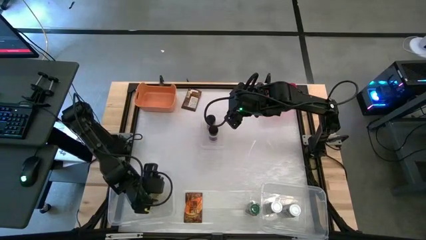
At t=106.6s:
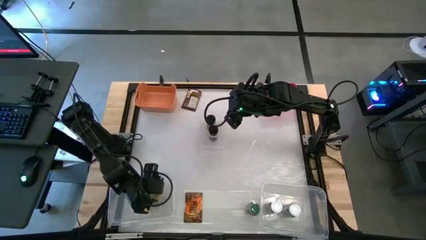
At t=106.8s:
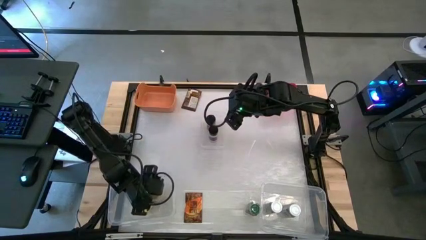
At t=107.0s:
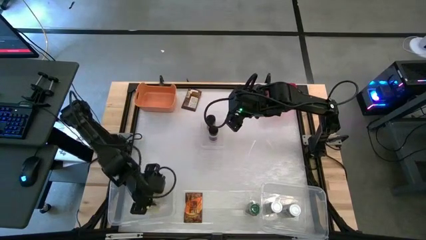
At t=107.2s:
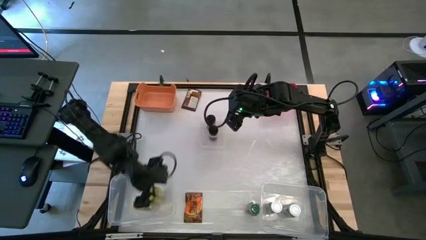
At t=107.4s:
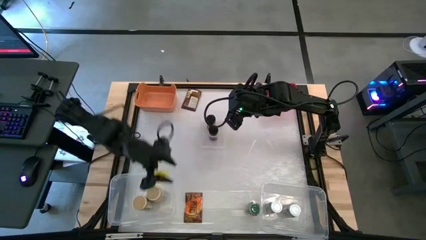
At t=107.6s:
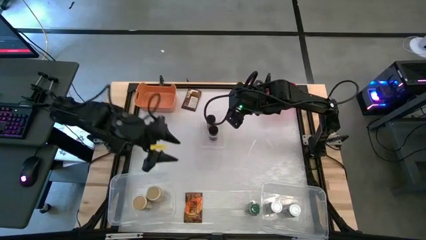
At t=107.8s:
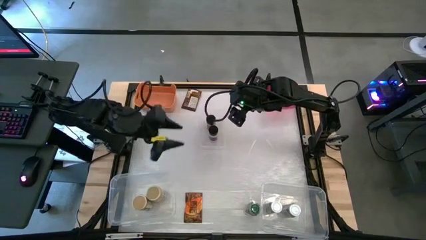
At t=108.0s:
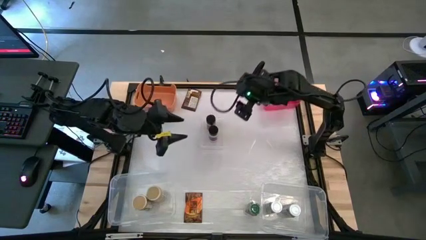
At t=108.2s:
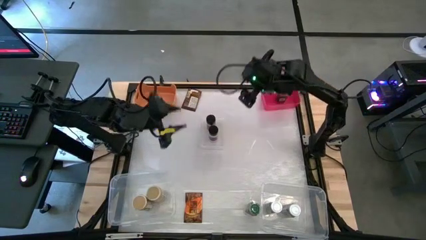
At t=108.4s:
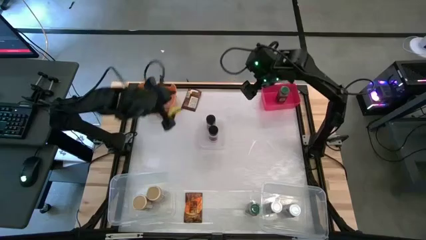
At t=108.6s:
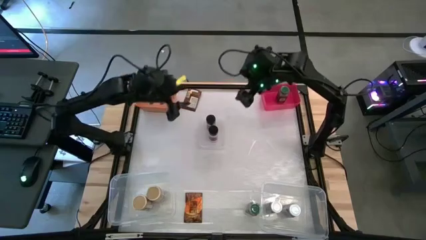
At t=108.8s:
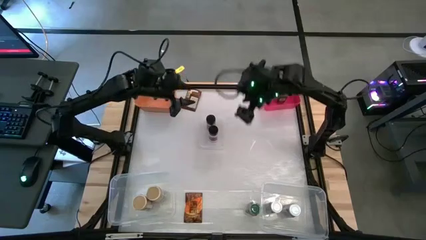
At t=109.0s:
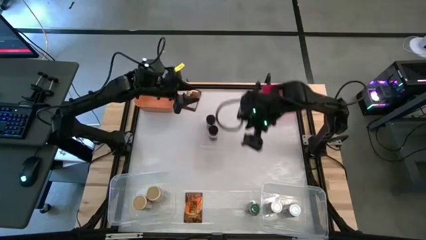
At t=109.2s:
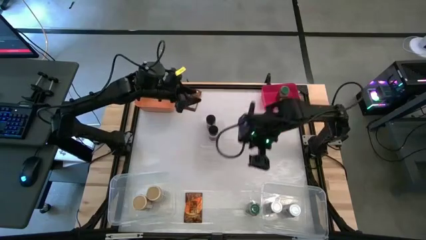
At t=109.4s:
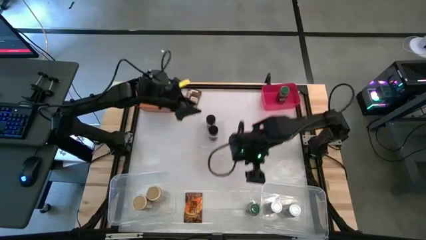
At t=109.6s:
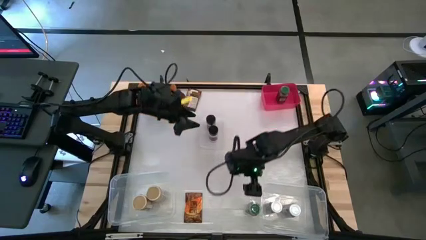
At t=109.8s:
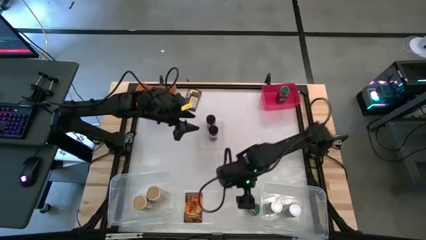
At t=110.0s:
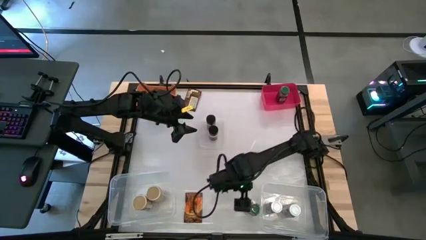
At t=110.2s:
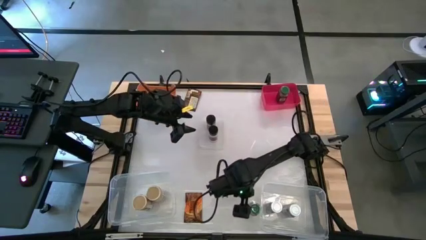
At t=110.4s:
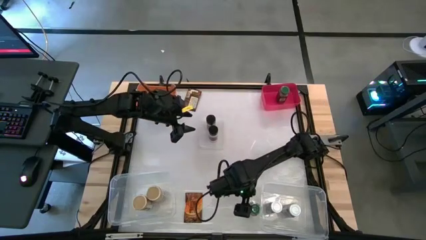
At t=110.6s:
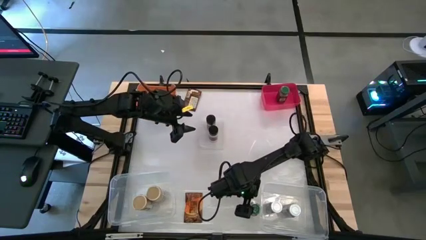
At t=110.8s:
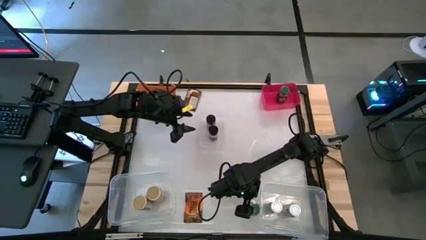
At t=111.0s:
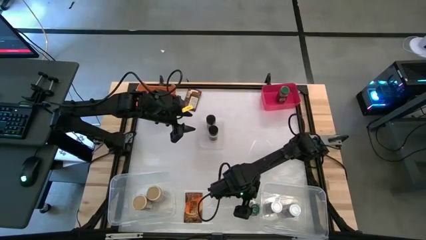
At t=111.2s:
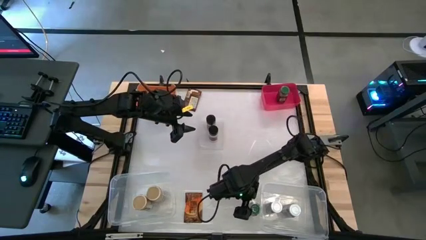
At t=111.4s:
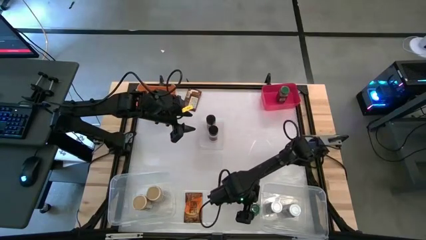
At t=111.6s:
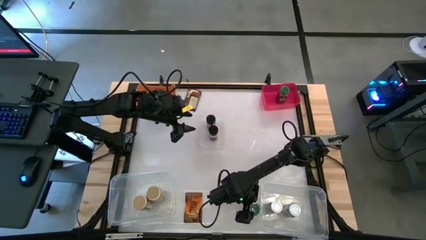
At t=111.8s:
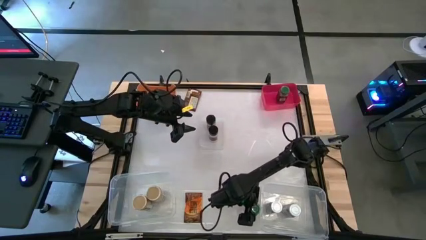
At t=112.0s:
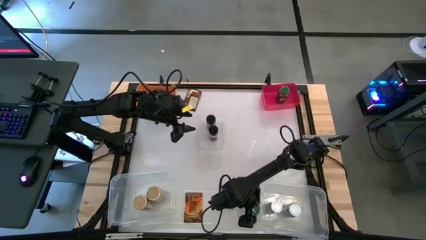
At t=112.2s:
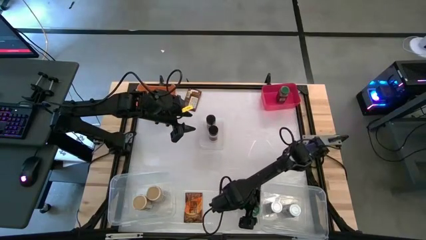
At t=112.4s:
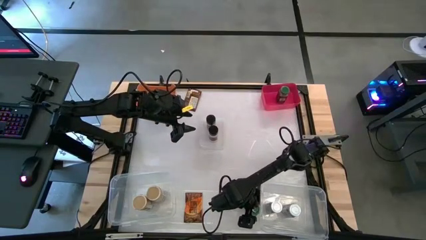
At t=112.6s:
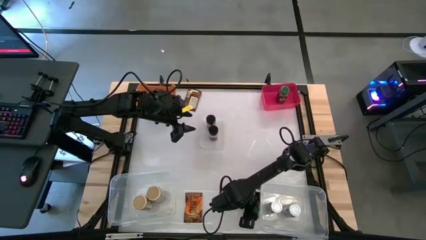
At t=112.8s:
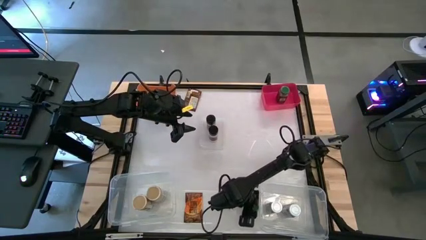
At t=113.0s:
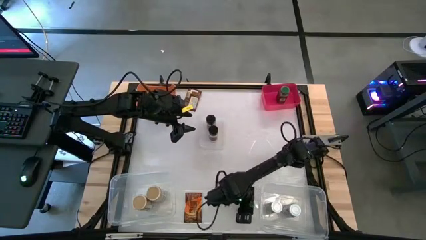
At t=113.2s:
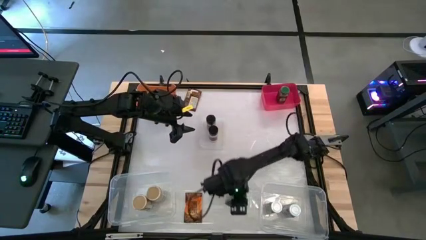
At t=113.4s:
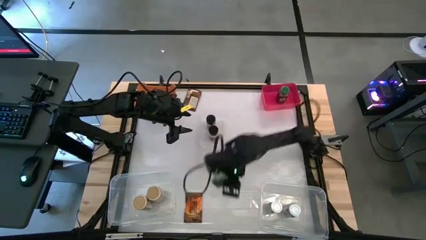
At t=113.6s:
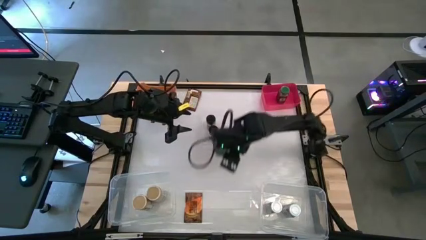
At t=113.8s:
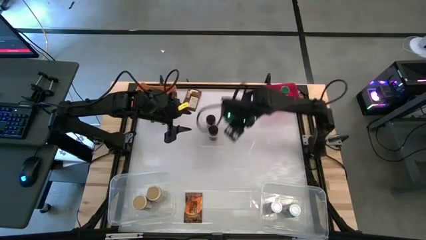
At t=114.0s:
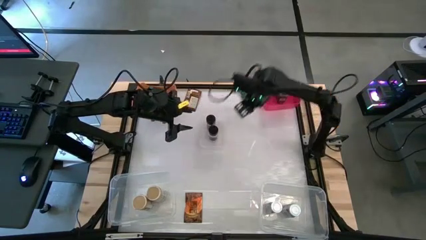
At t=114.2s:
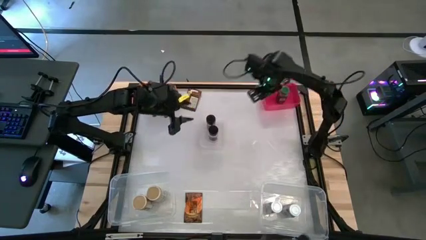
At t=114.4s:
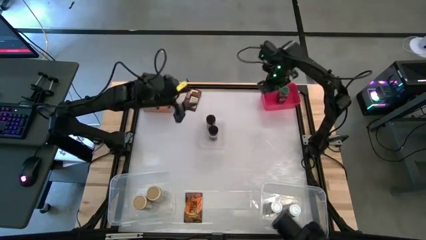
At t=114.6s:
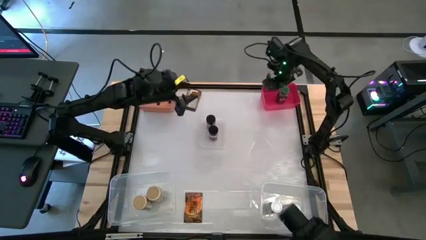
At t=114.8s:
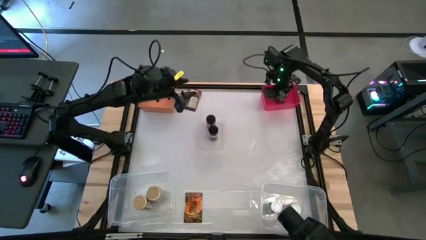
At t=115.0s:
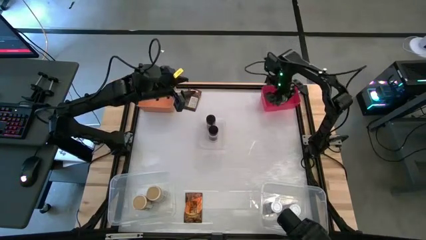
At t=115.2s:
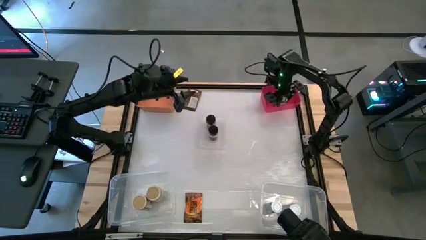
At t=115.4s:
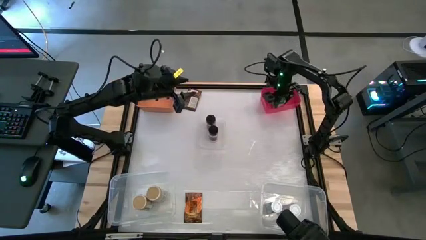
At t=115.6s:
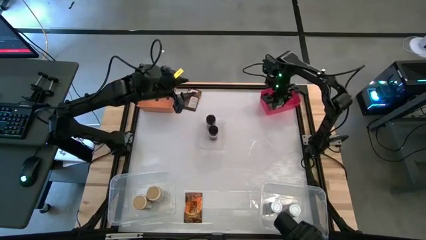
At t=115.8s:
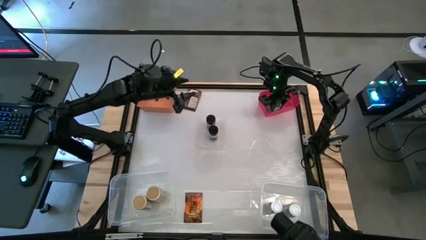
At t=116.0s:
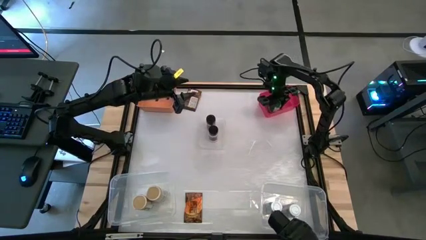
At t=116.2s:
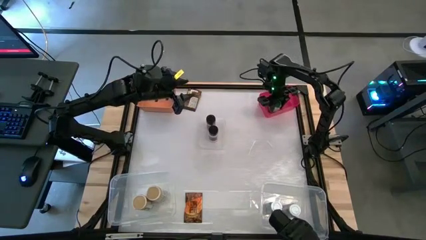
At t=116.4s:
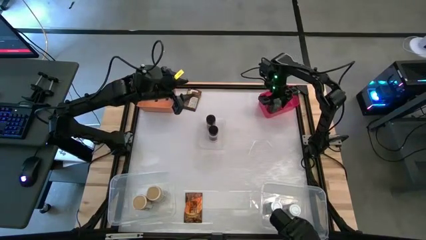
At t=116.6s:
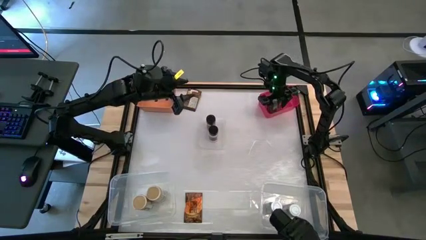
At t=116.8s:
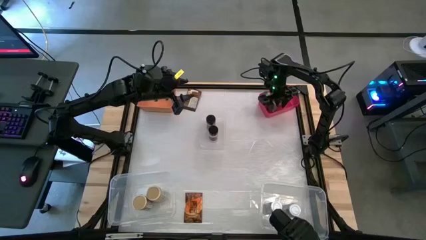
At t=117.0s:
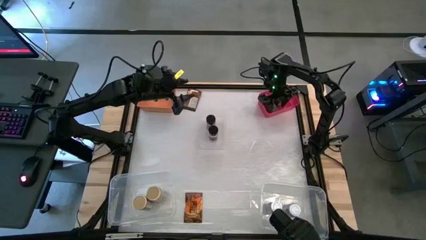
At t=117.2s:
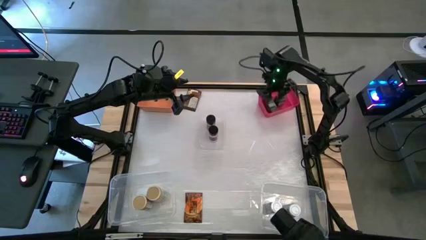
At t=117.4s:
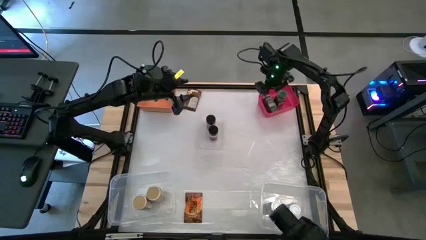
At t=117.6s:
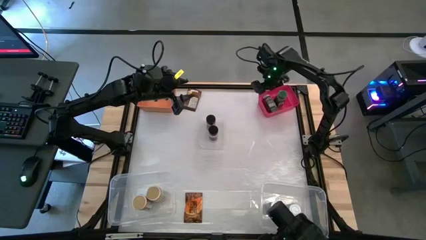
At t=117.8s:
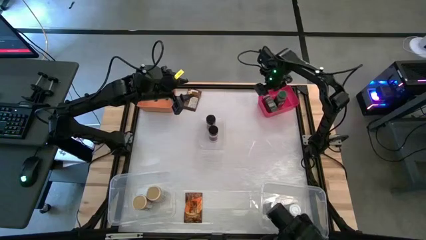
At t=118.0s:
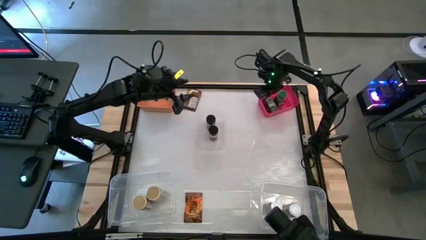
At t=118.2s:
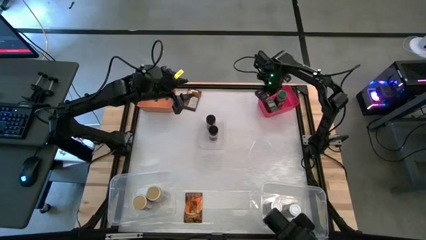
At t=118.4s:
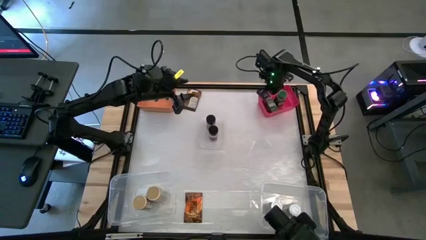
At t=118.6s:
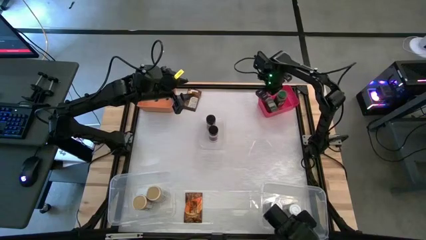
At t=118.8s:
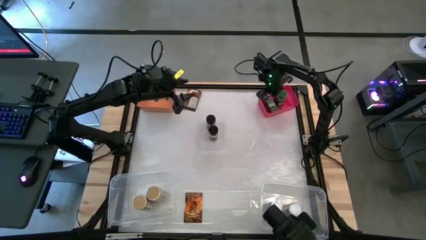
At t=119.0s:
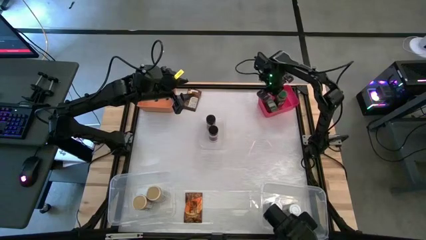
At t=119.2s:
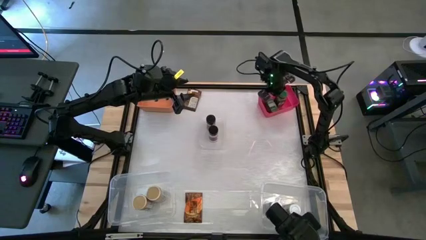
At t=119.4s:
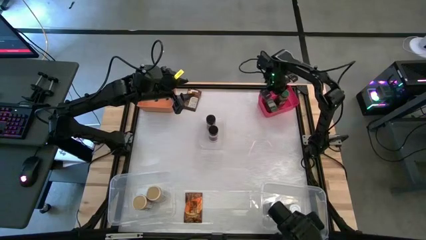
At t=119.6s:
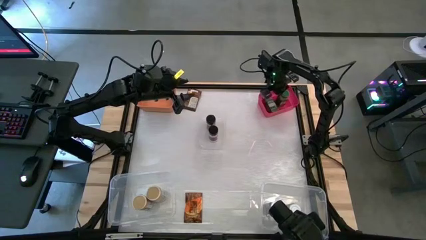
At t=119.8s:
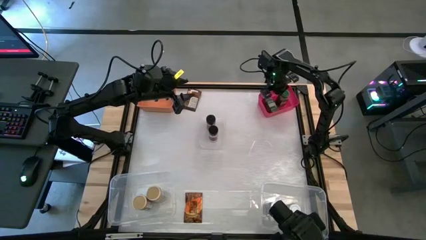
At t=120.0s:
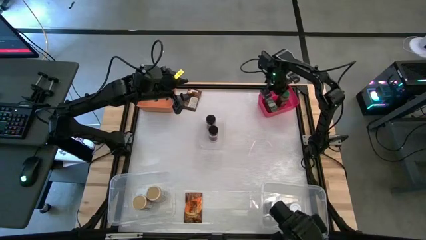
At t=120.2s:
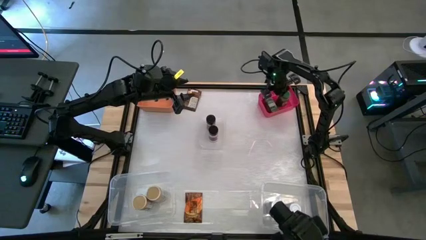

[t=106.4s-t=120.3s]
Task: Sort spices by type
Put the green seasoning bottle into the pink bin

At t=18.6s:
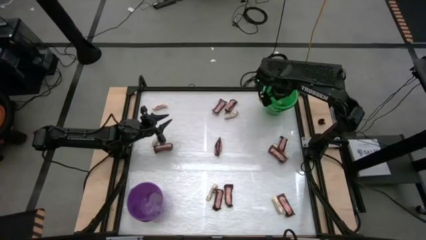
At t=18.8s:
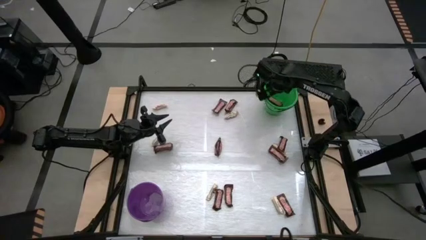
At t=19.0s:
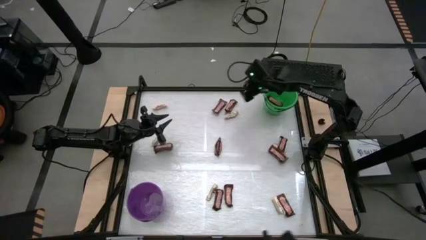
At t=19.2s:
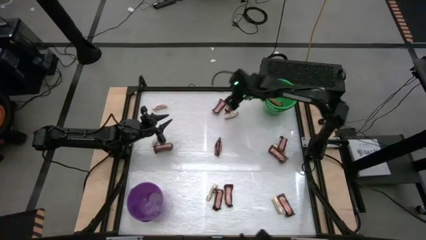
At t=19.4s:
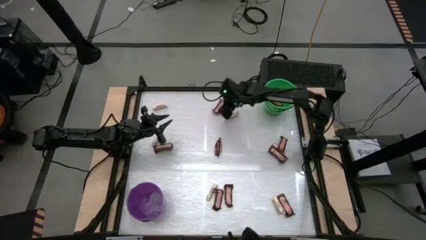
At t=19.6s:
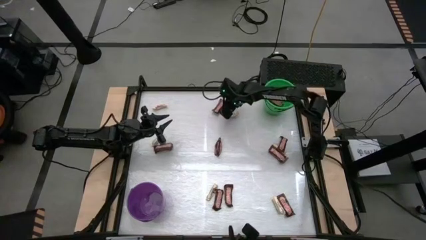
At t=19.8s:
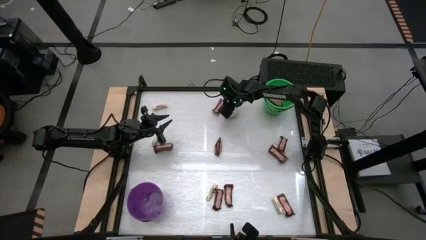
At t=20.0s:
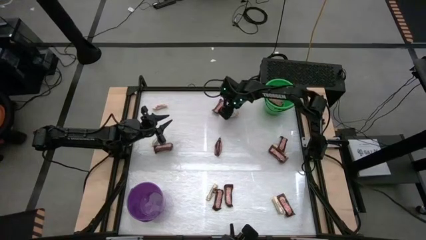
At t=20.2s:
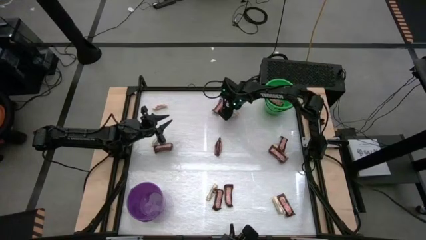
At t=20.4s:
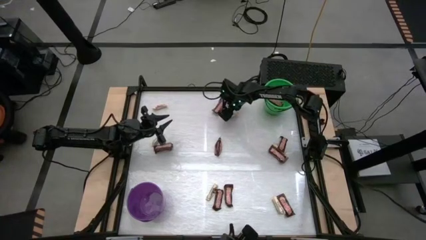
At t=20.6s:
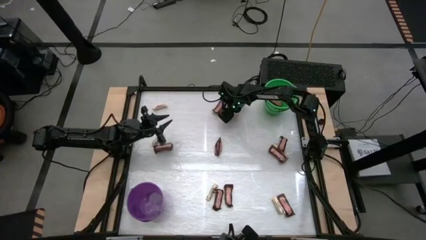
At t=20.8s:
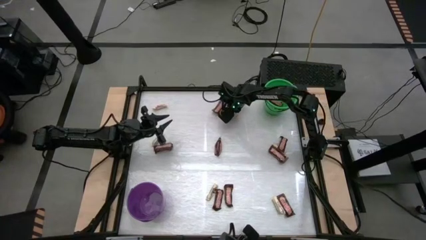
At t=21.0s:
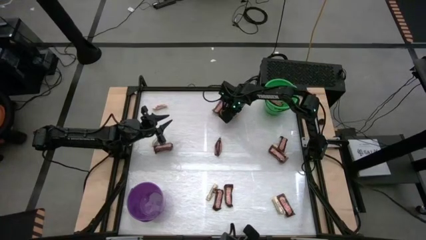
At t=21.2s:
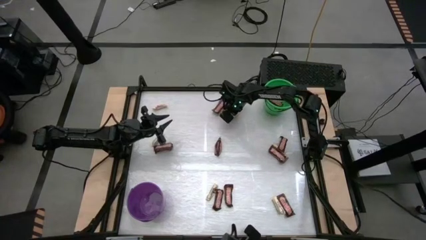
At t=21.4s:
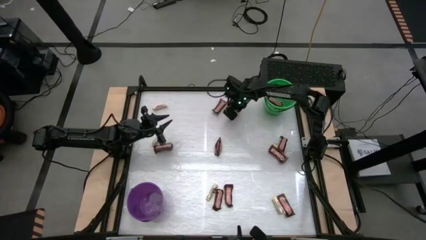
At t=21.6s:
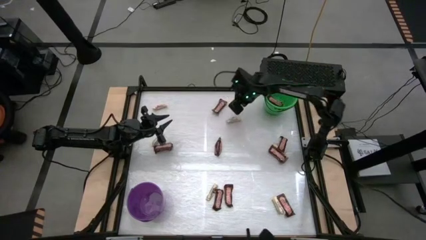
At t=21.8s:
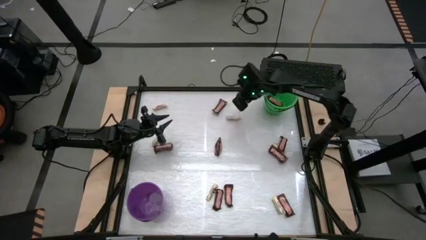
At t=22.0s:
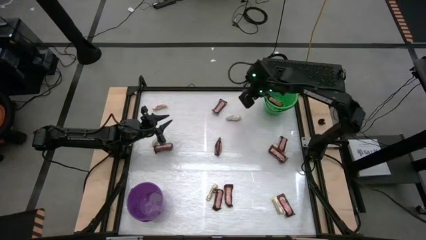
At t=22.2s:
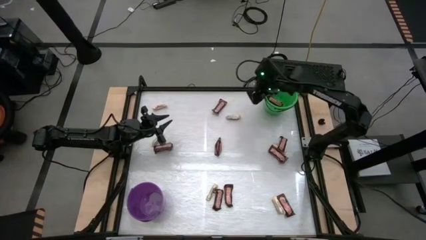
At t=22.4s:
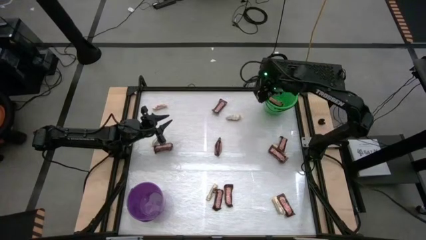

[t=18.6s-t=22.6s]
Task: Sort candy by brand, put in halloween buckets
Put the brown candy bar into the green bucket
